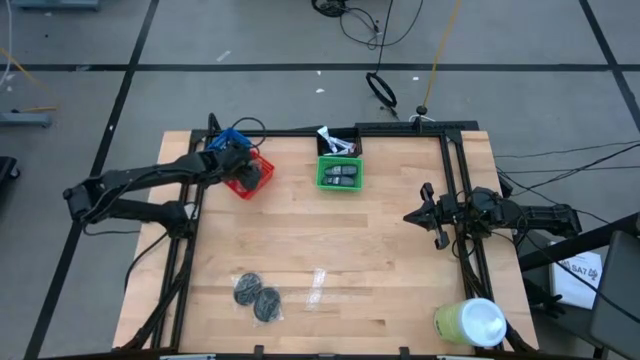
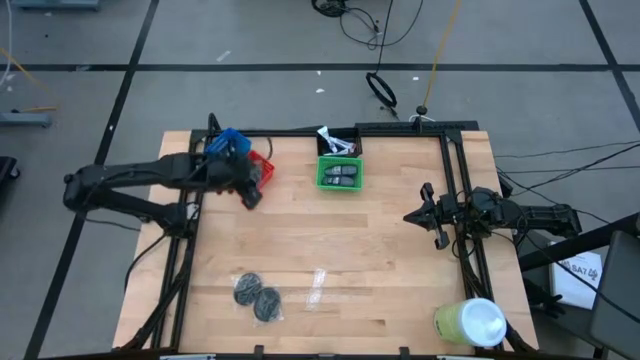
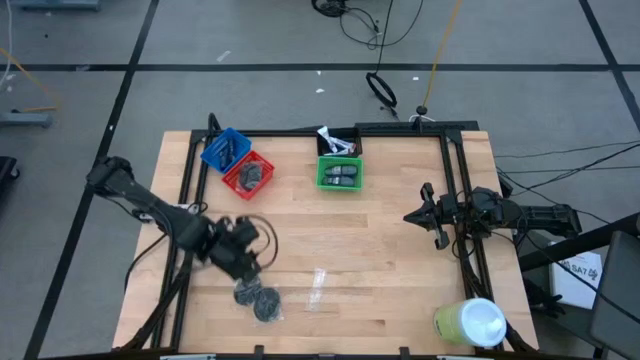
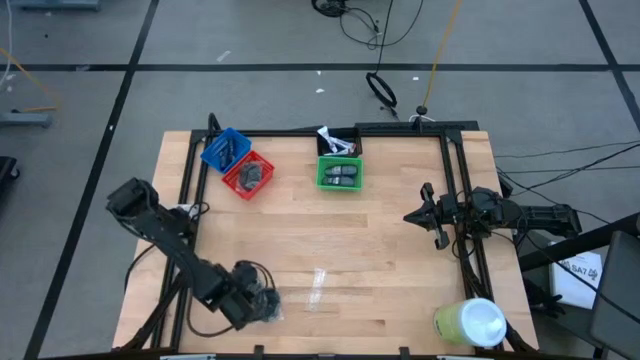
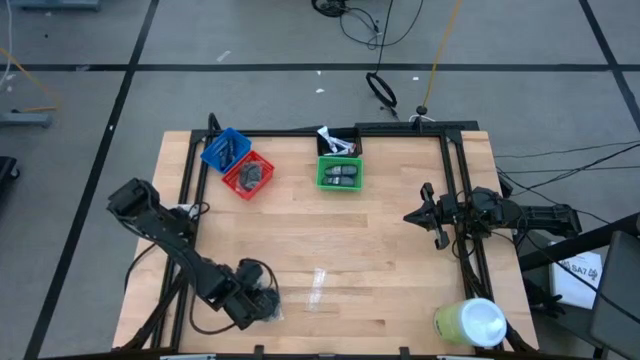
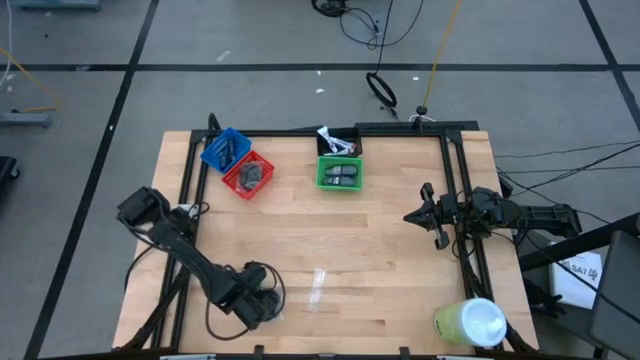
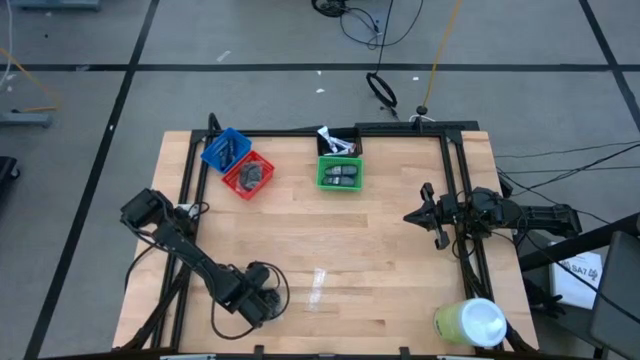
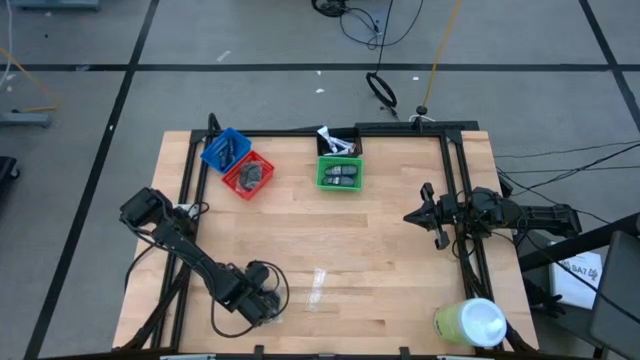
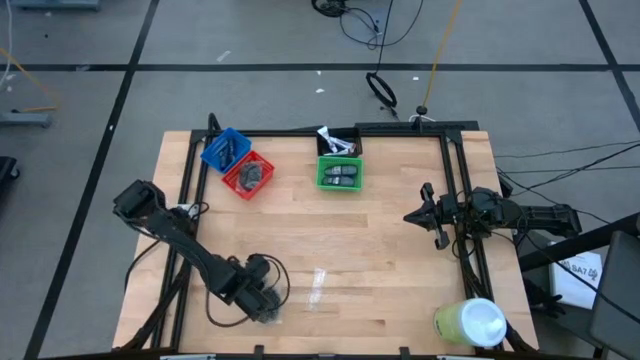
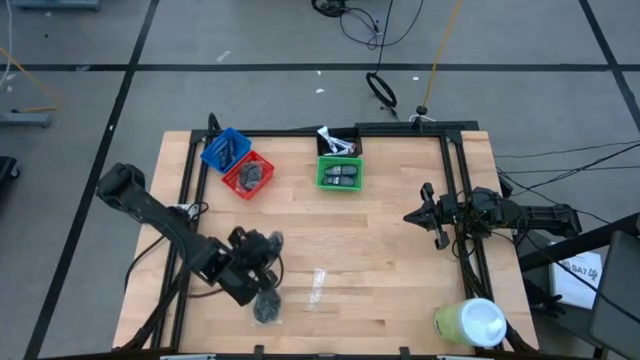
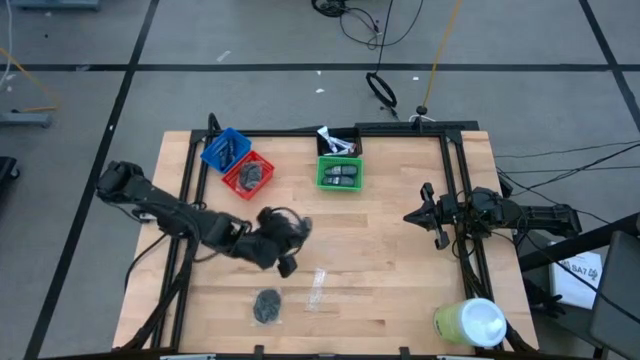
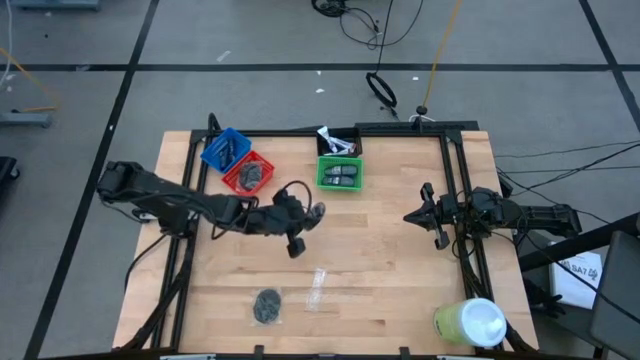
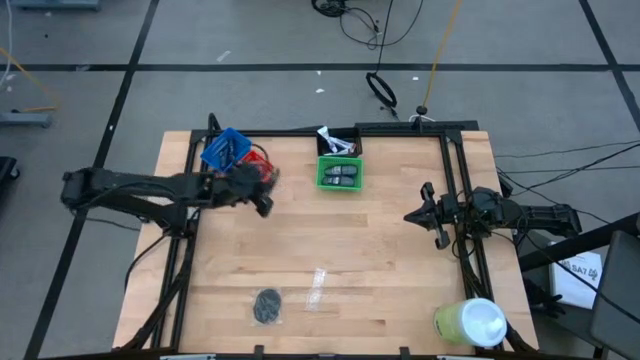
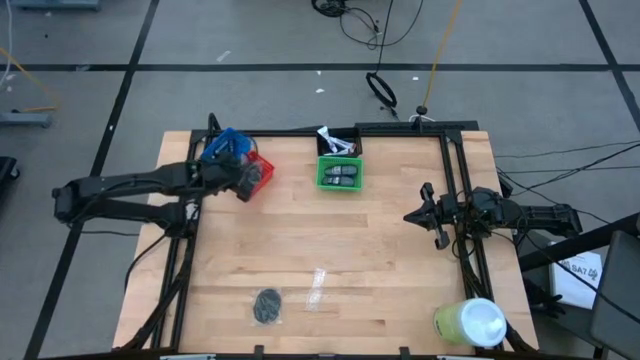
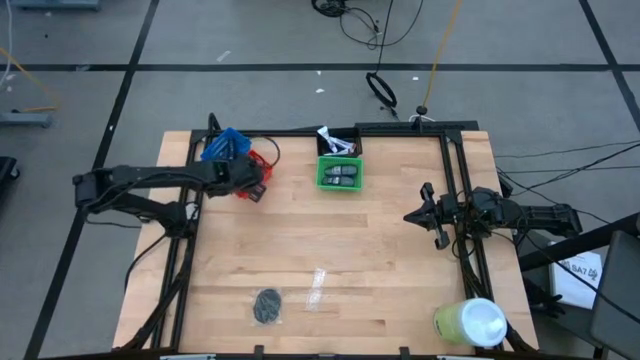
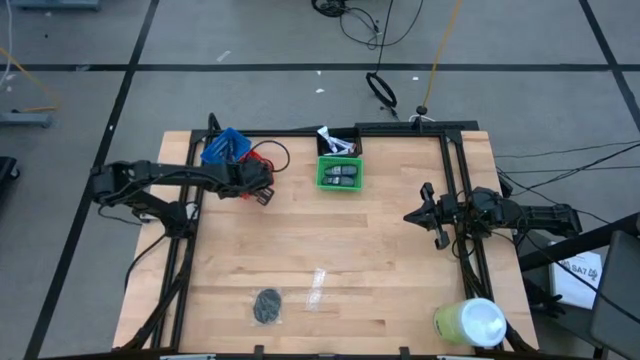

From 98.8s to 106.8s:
Task: Pick & Place Travel size toiletries
Put the left black hairbrush into the red bin

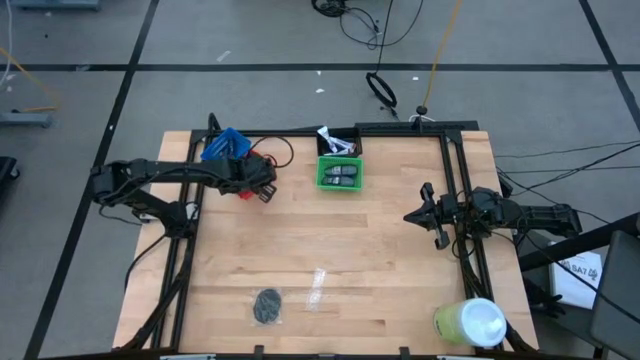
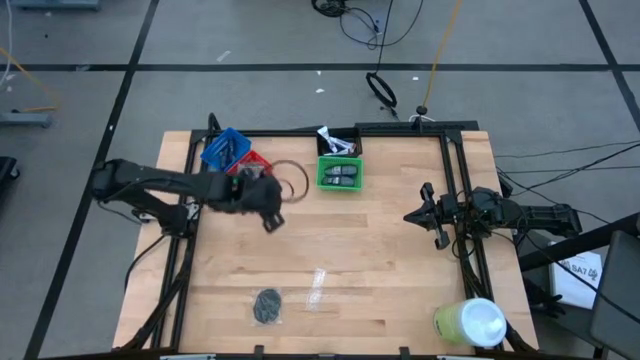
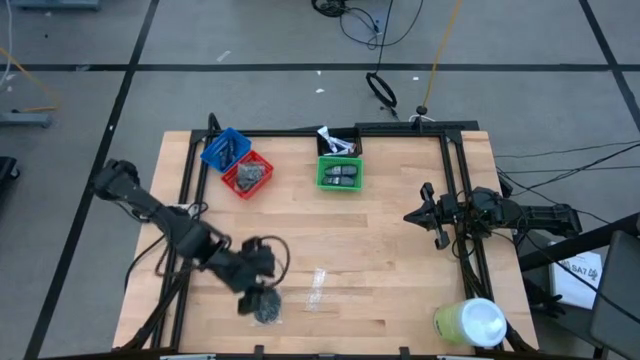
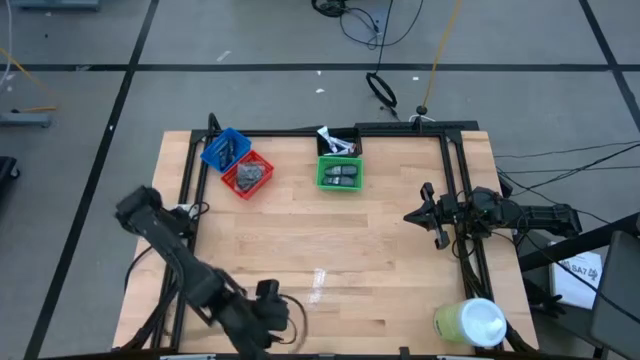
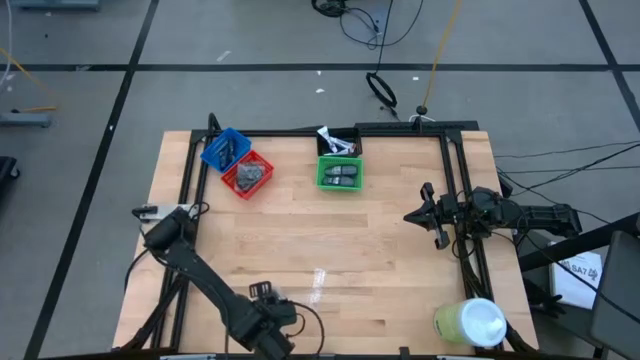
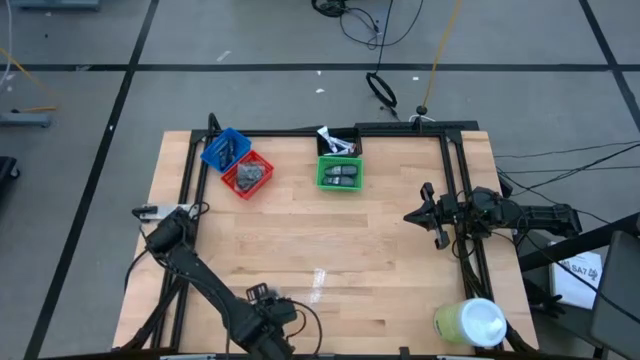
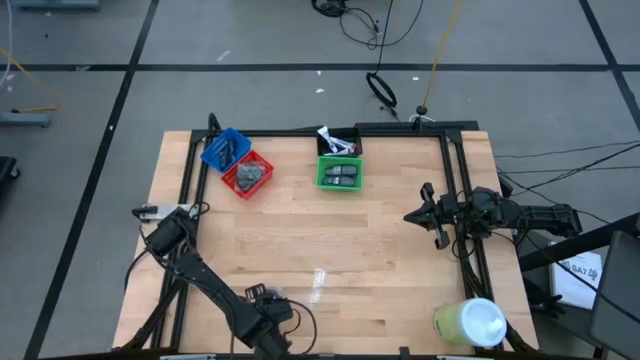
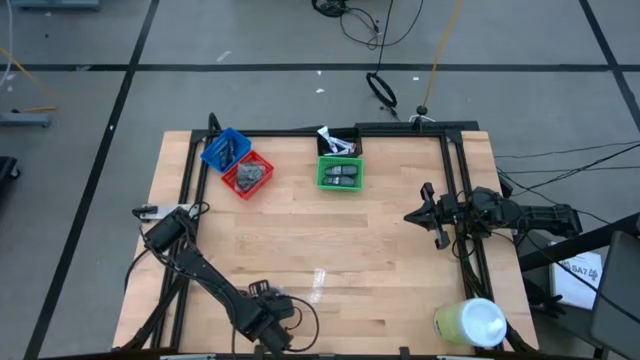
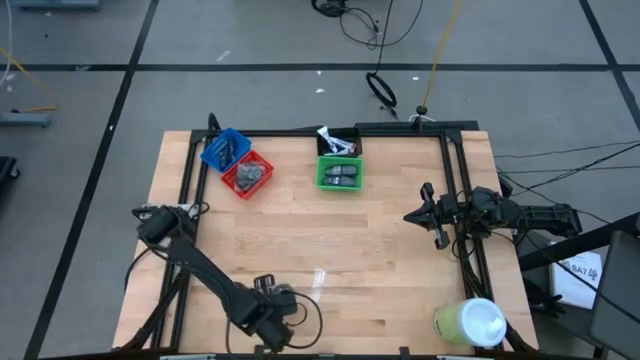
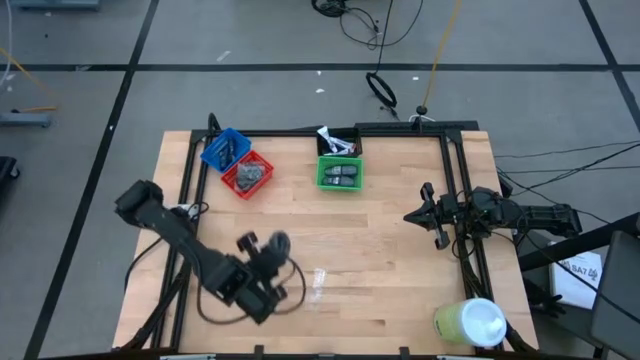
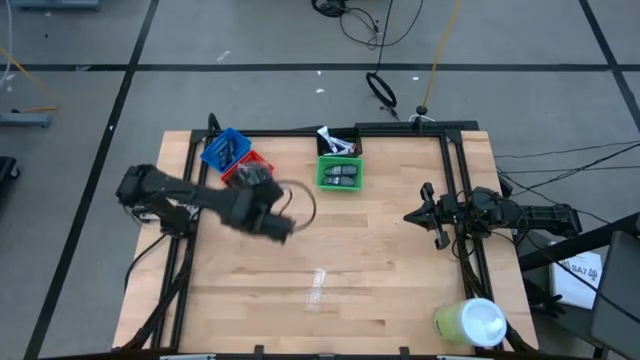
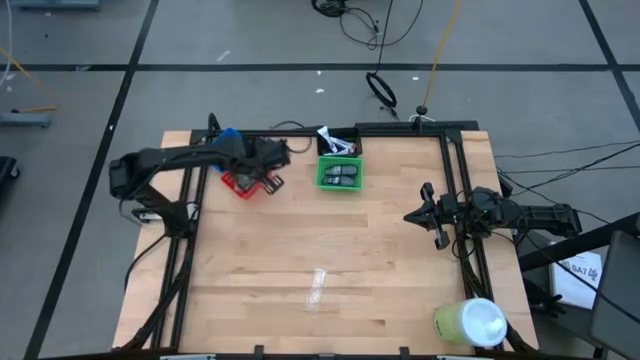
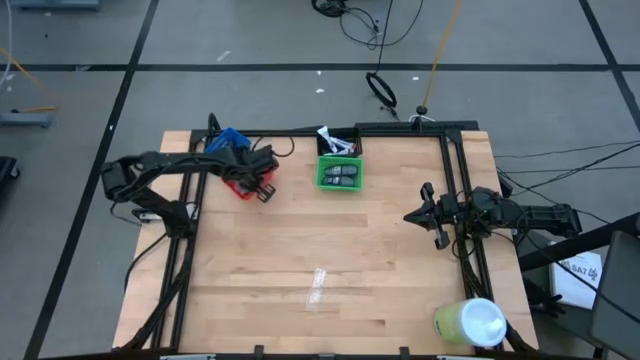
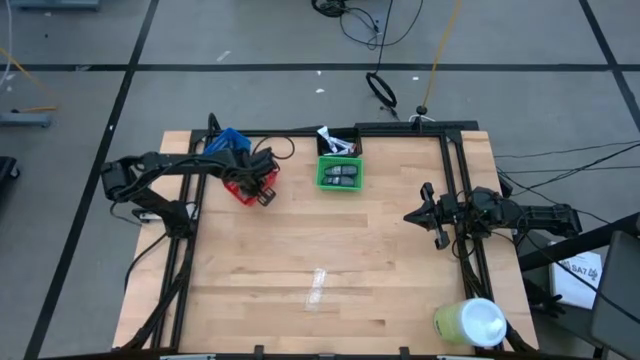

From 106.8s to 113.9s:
Put the black hairbrush into the red bin

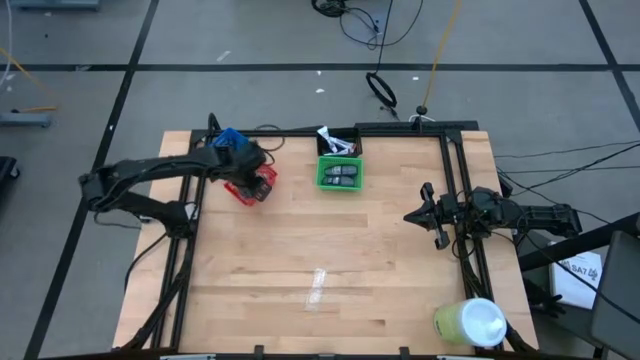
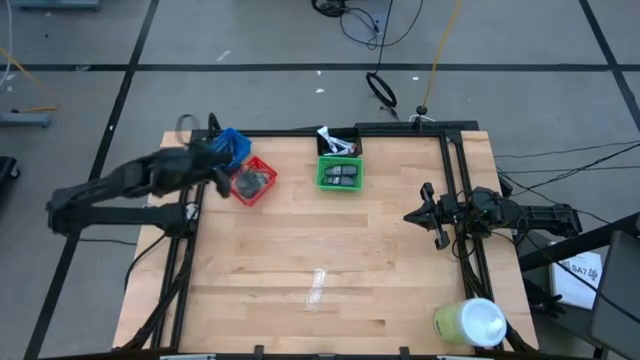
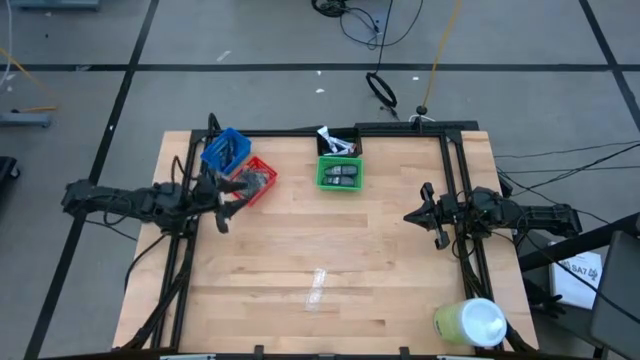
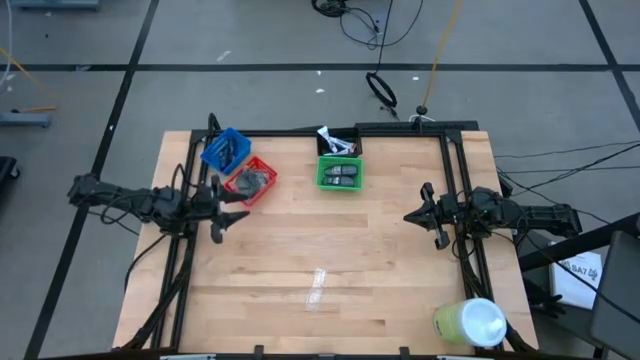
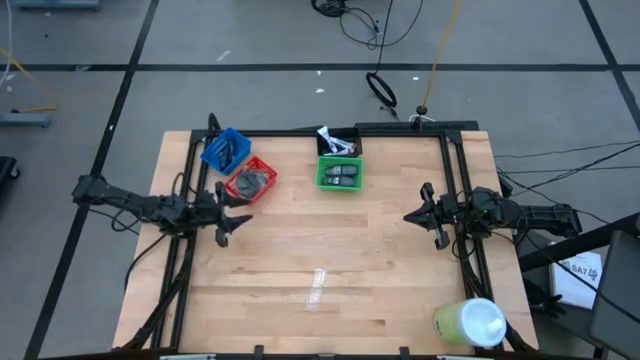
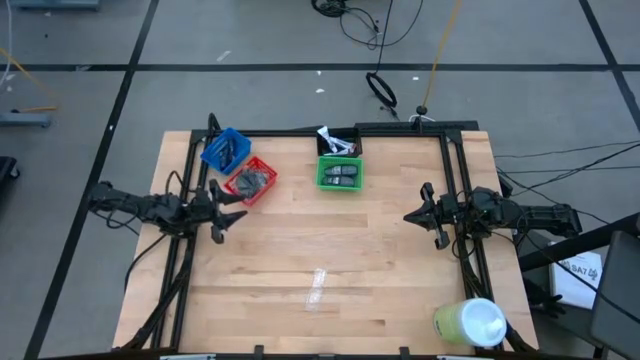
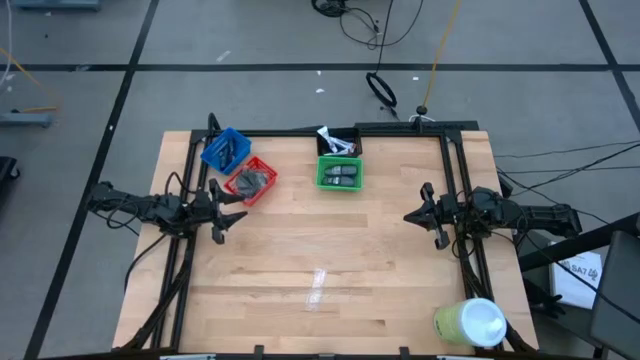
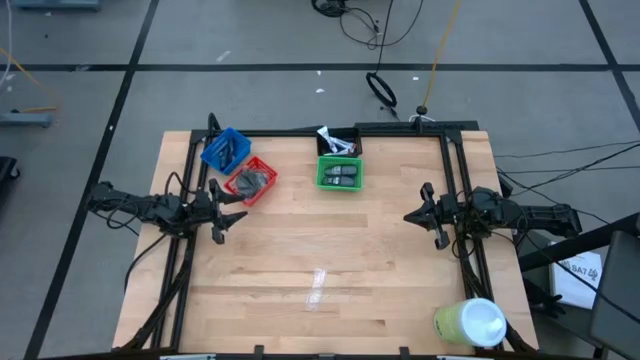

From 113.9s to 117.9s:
Return to Home Position

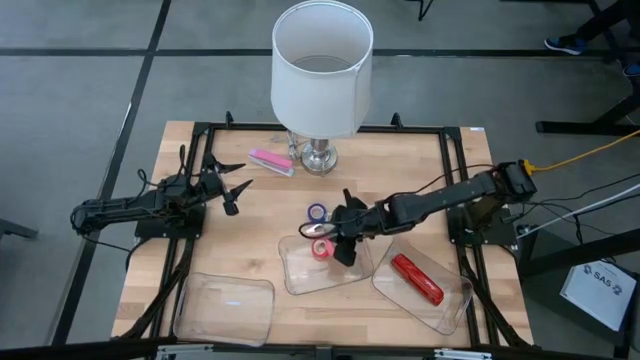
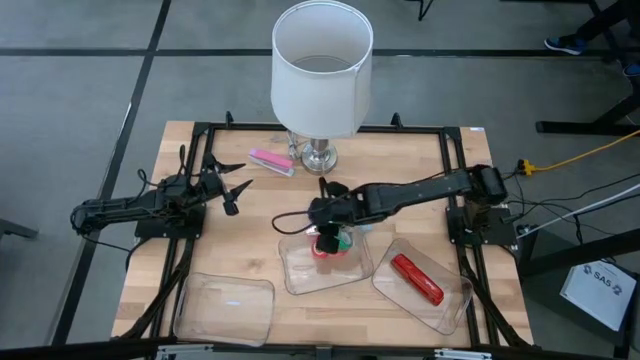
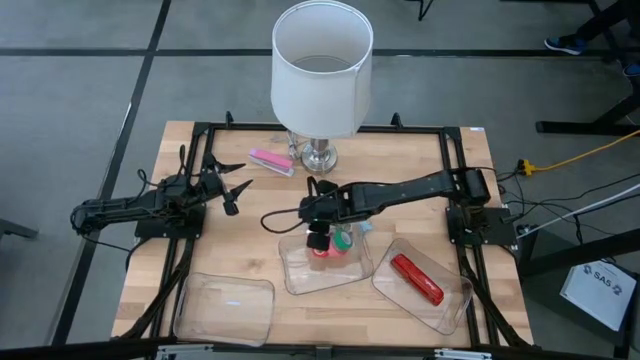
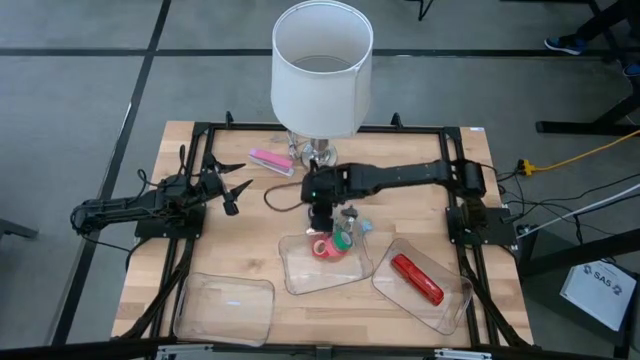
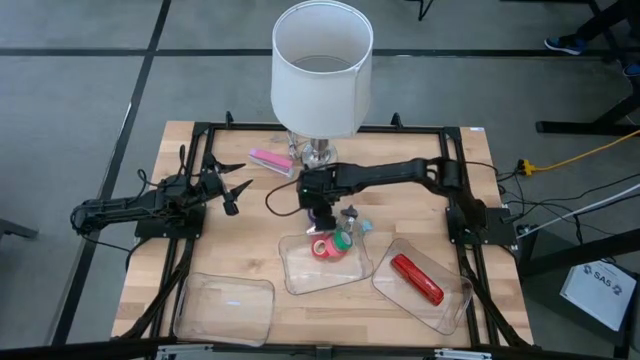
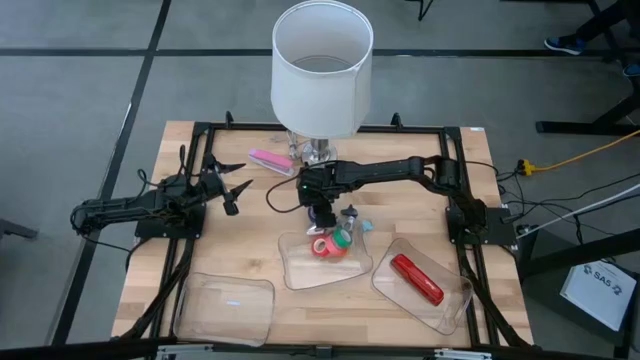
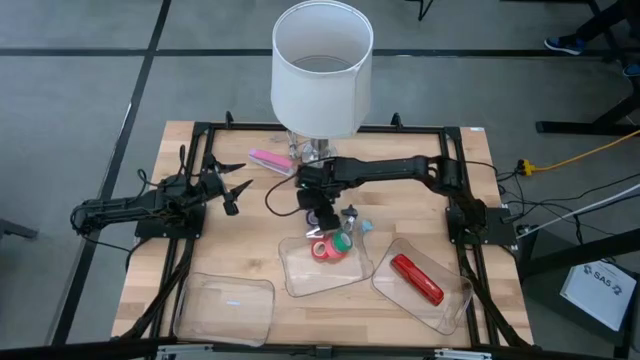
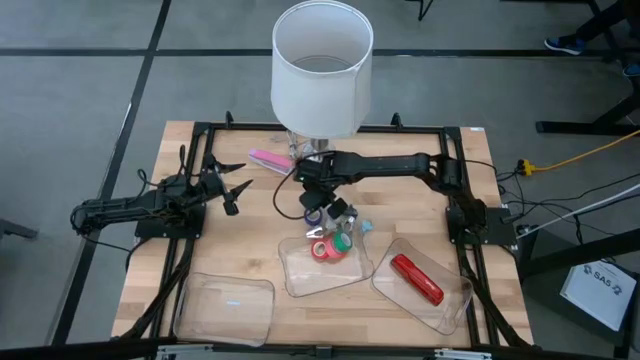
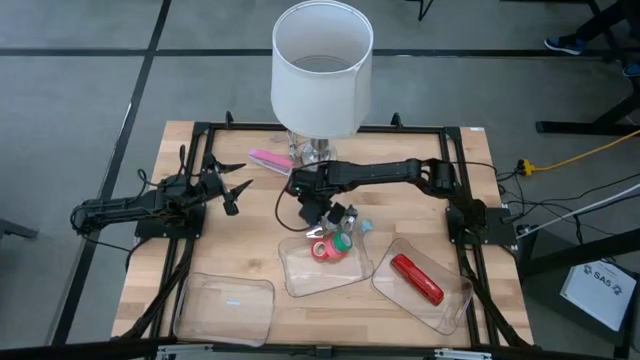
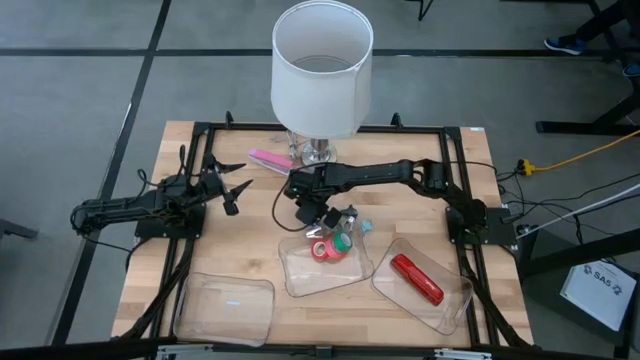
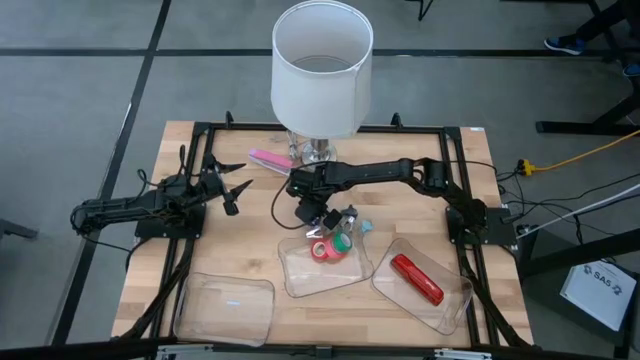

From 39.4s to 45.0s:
Task: Pick and place Stapler, Stapler remover, tape
Put the blue tape into the top transparent bin
